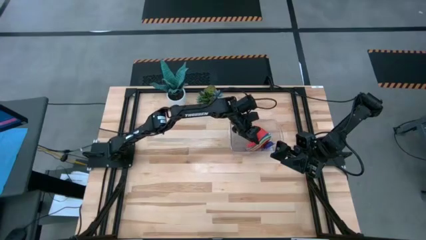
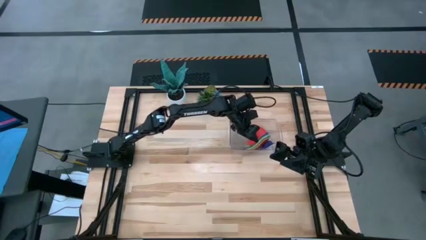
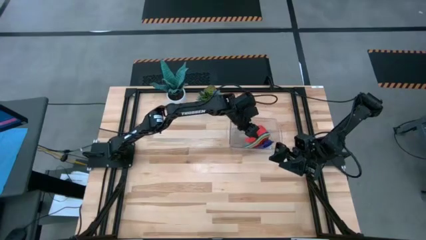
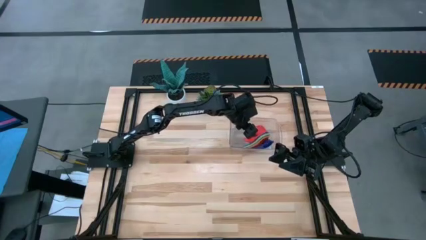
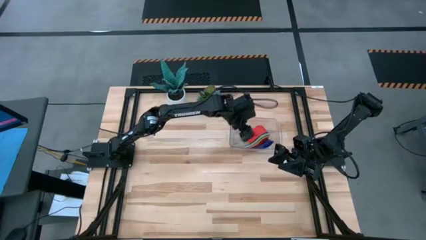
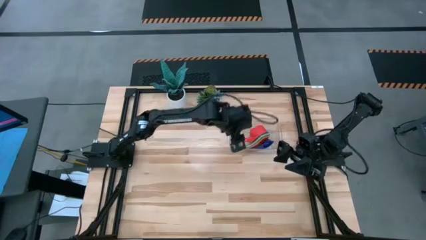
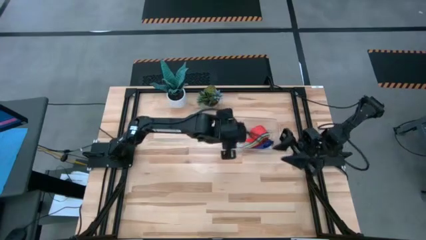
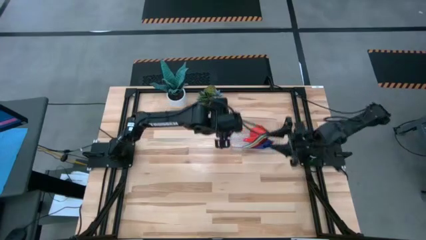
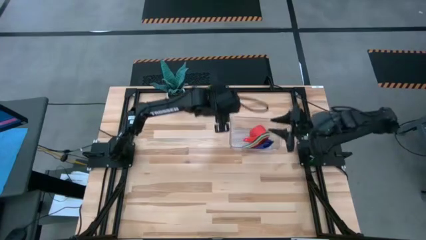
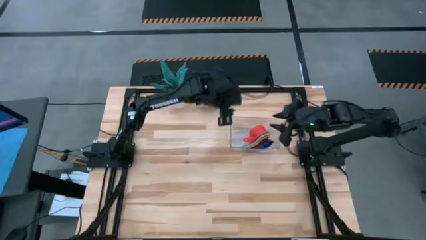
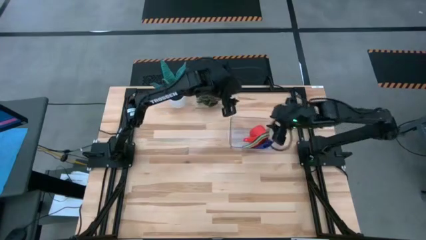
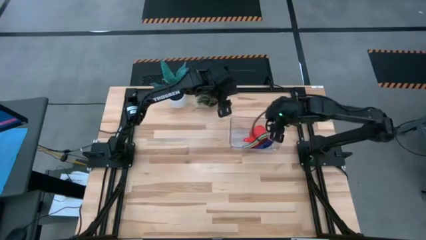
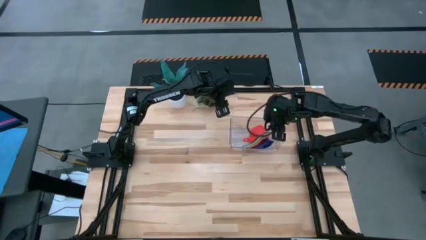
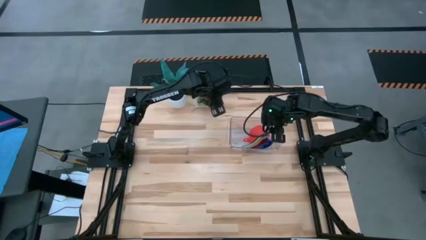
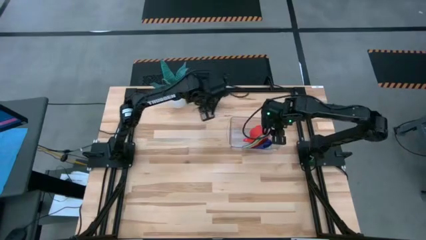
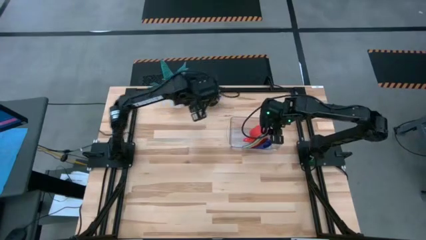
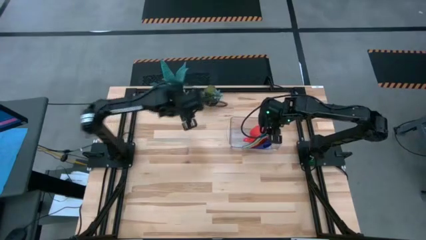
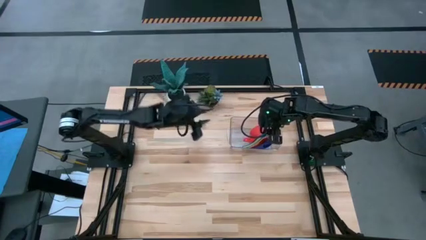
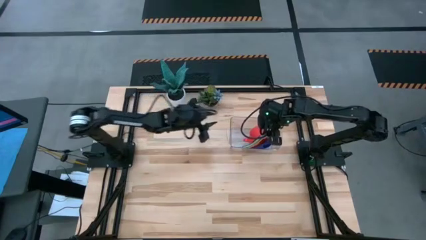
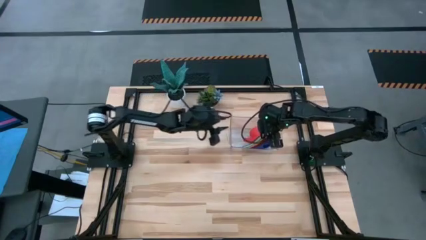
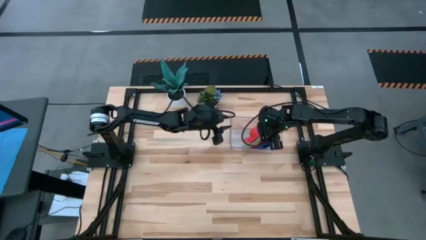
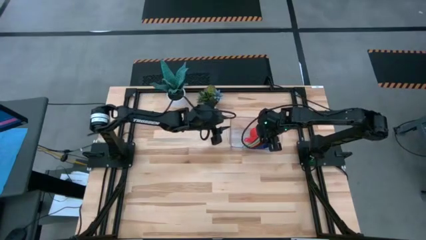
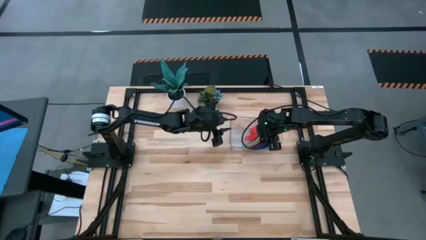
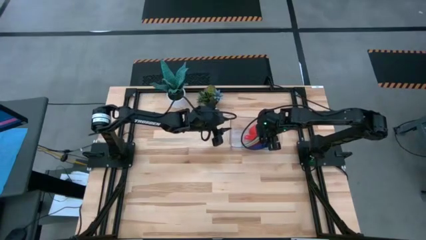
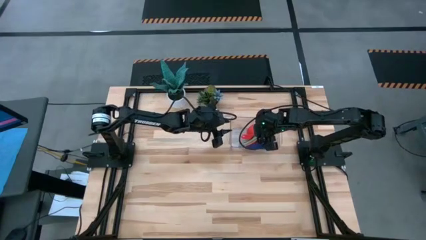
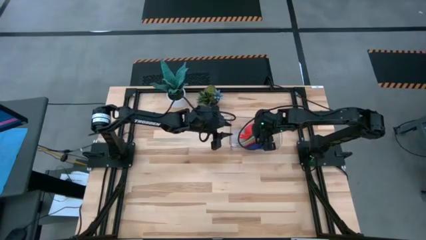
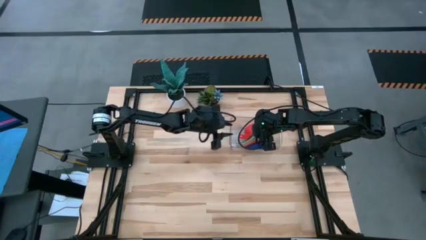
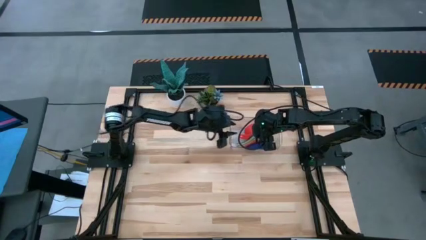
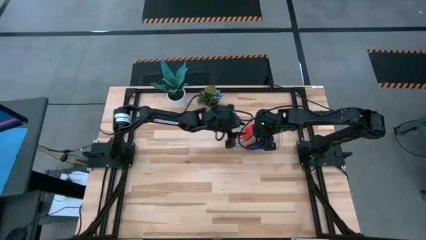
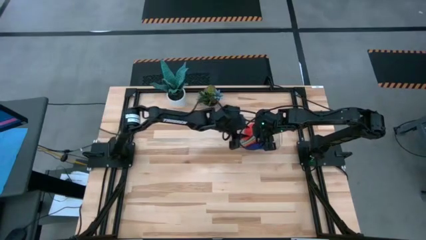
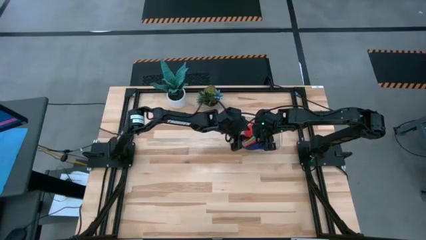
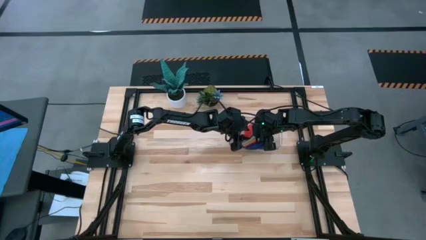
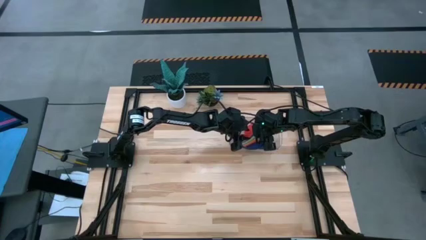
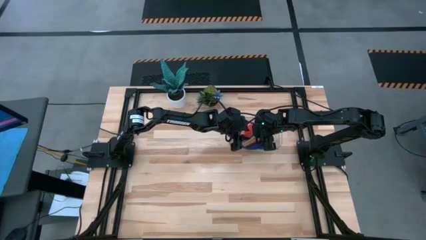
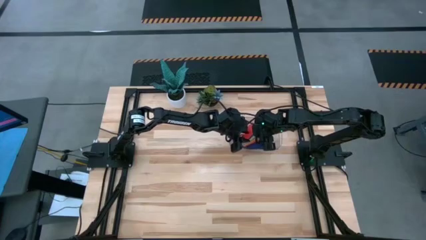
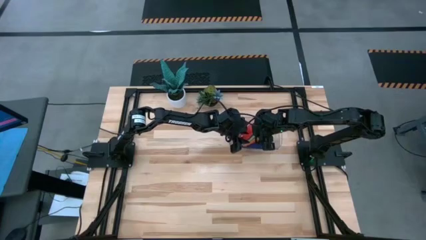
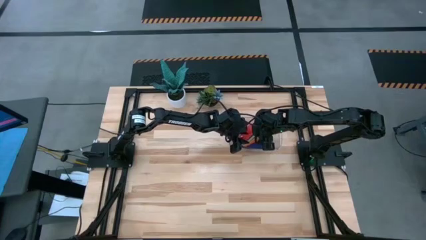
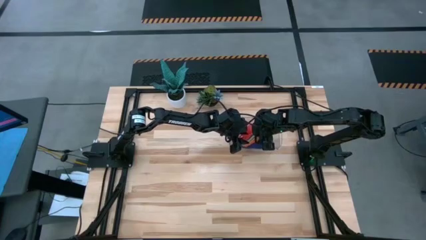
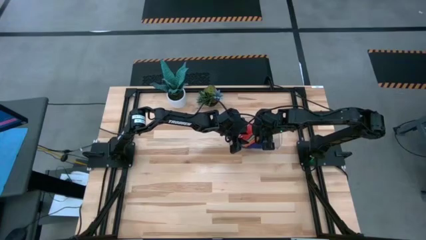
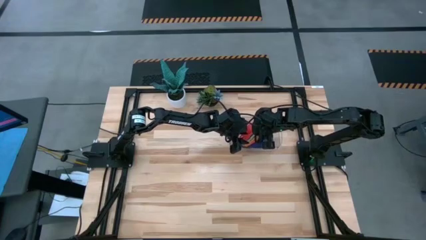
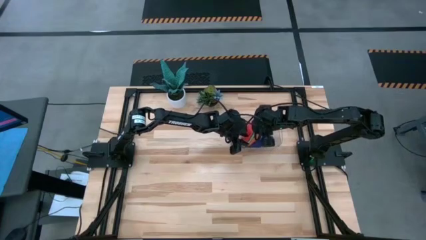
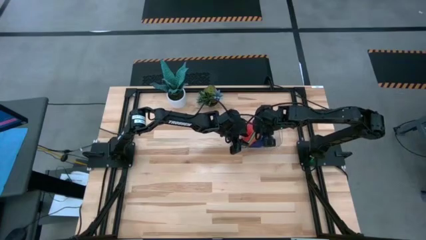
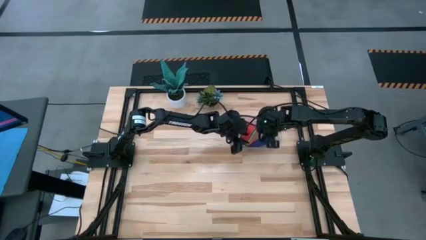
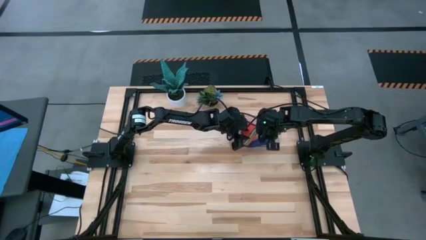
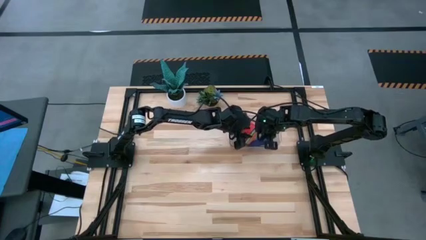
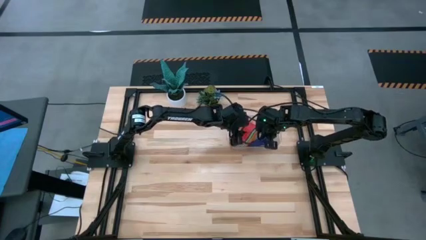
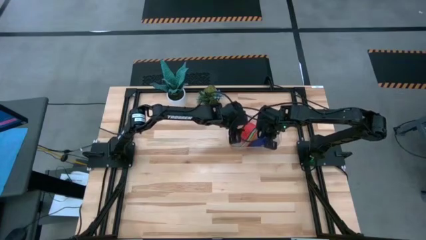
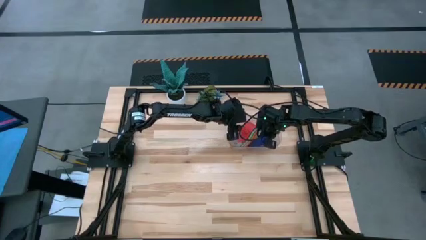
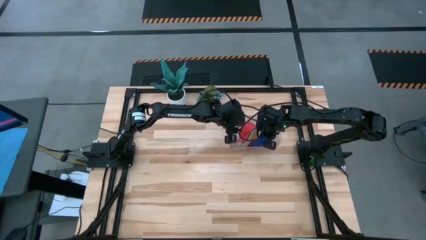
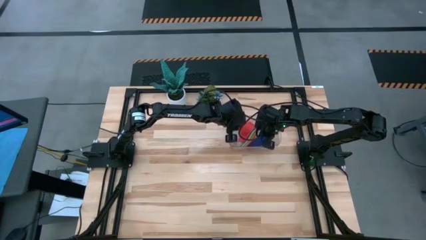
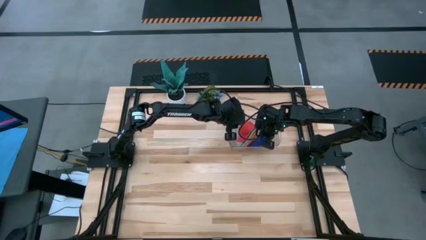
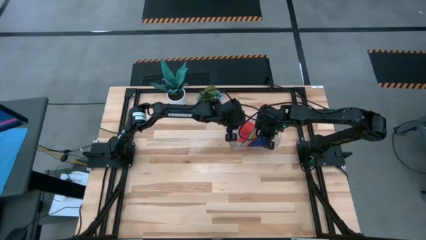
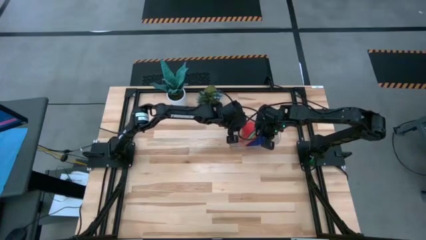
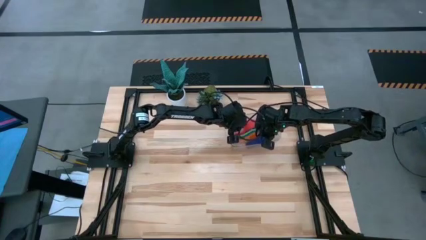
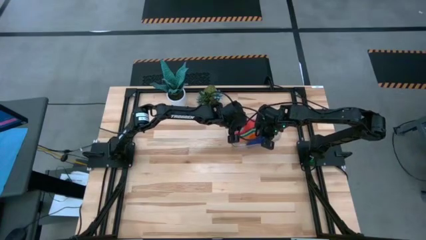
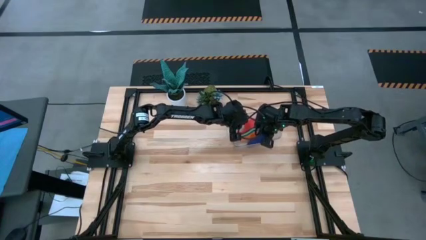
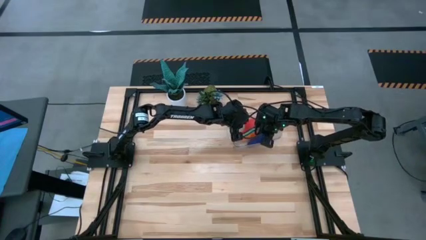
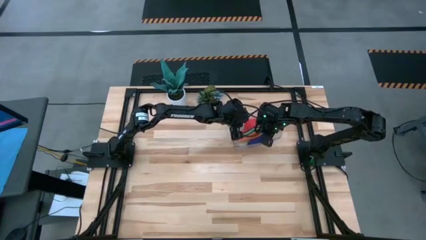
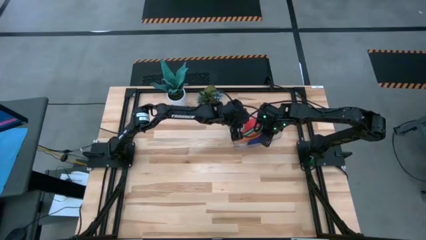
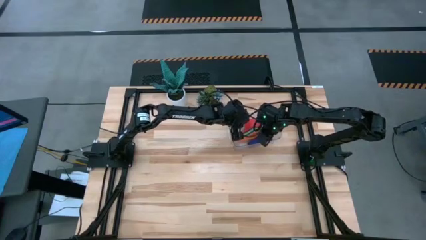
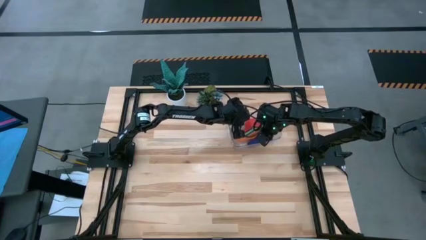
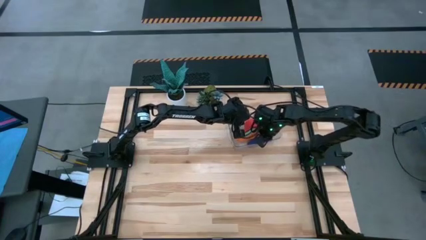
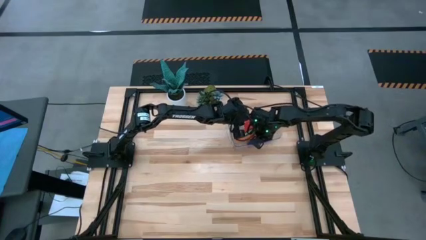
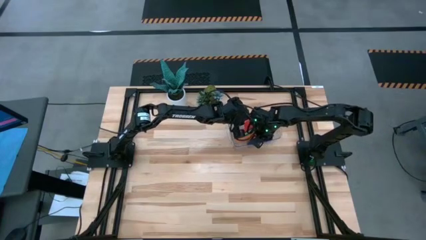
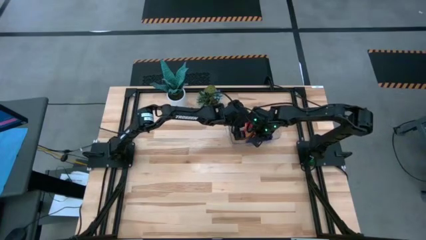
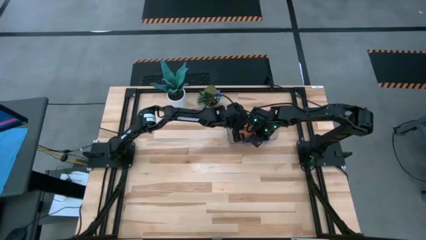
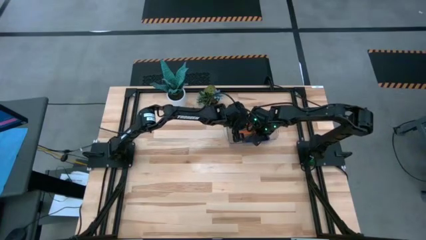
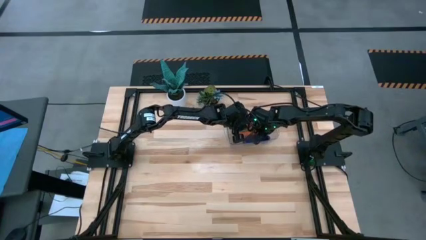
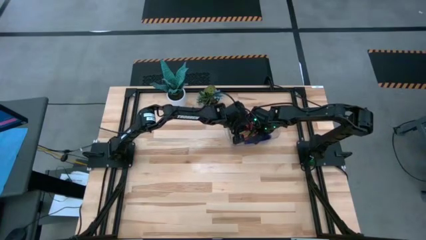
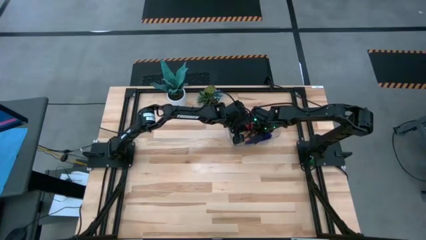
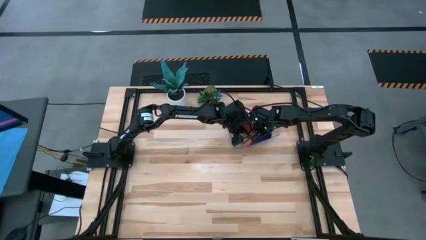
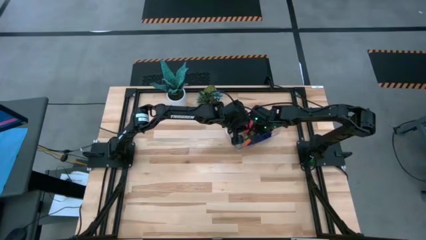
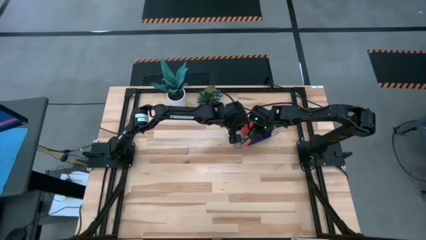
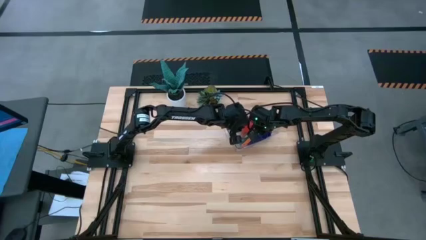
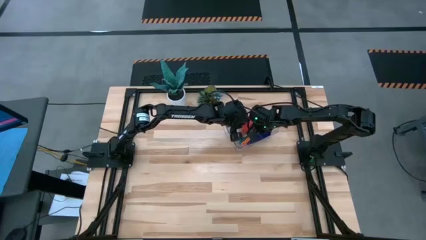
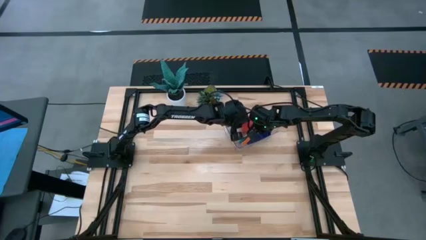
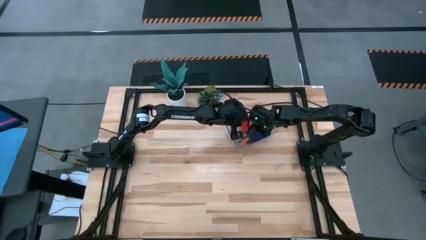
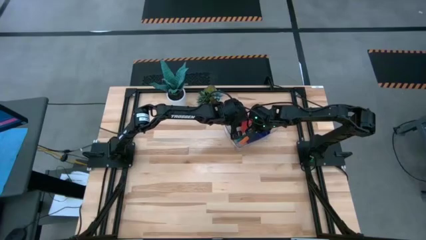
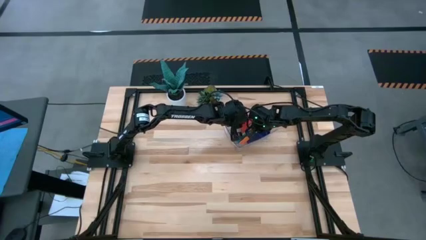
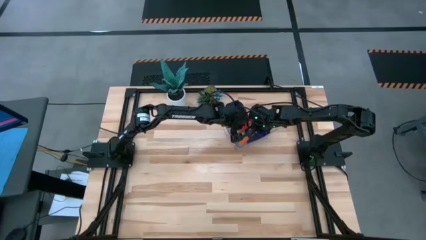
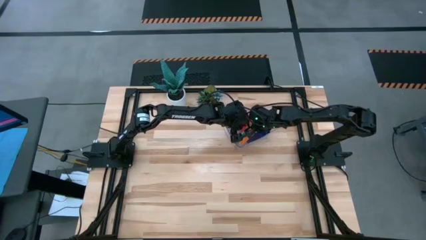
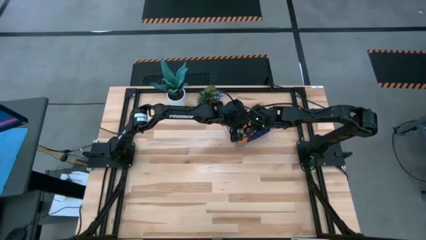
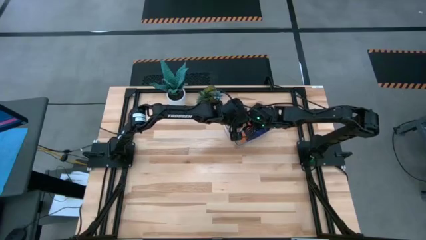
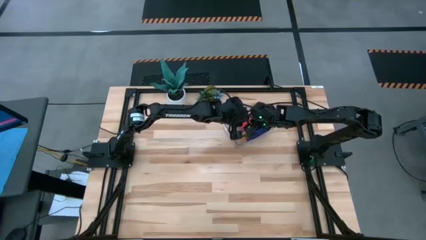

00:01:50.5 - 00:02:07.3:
Task: Nest measuring cups in basket
Adjust the nested measuring cups in the transparent bin
